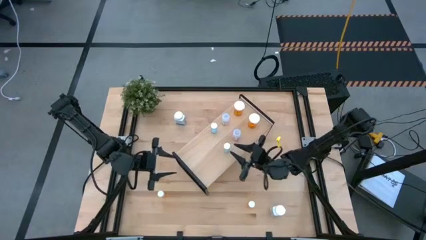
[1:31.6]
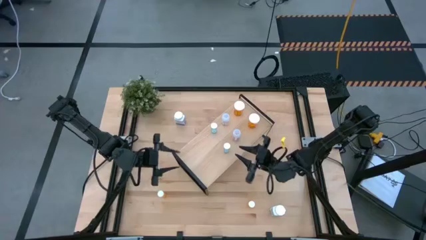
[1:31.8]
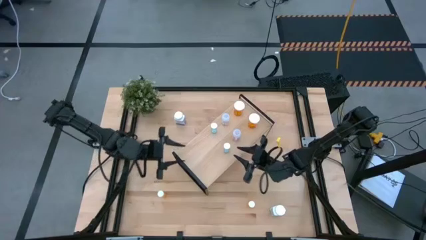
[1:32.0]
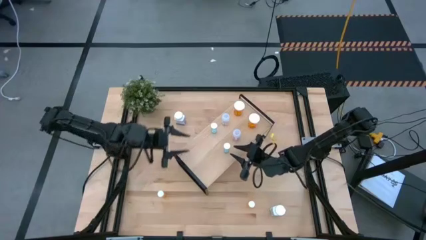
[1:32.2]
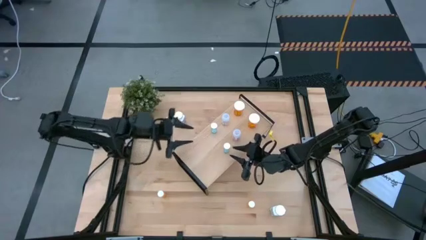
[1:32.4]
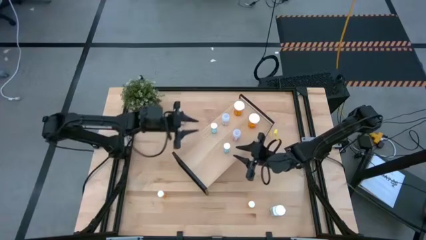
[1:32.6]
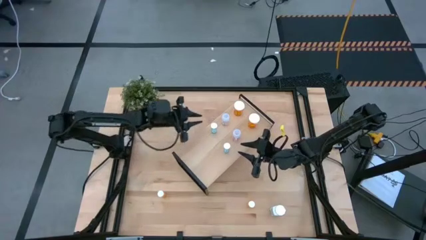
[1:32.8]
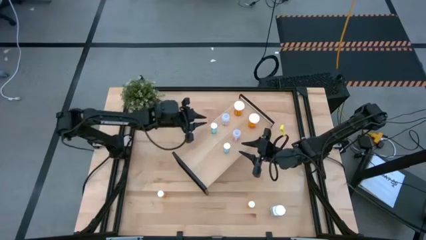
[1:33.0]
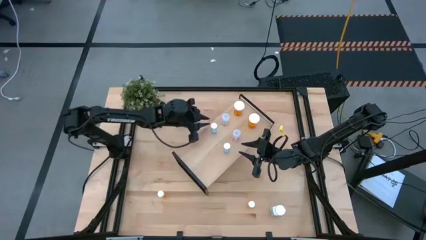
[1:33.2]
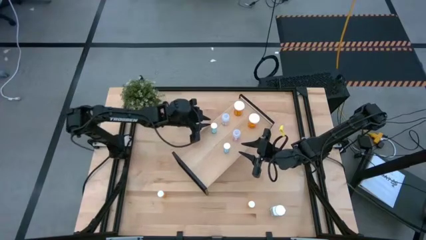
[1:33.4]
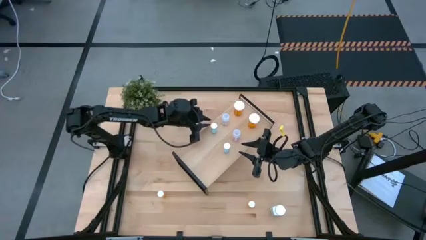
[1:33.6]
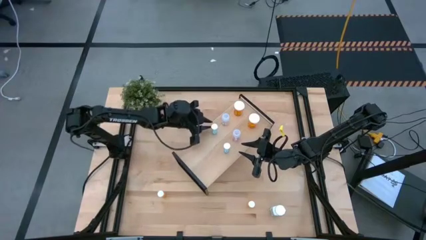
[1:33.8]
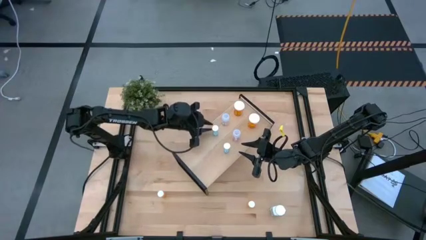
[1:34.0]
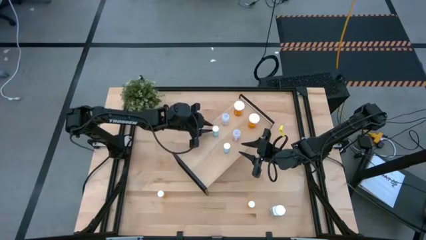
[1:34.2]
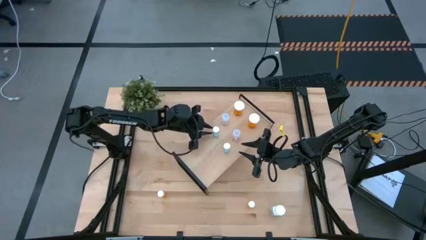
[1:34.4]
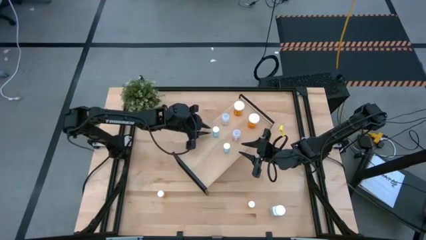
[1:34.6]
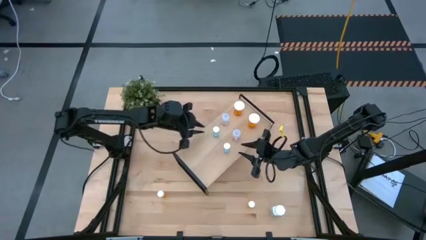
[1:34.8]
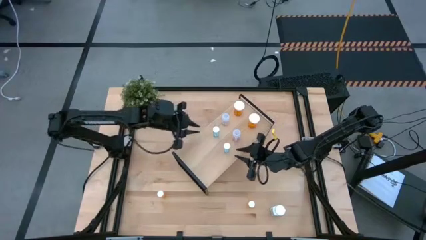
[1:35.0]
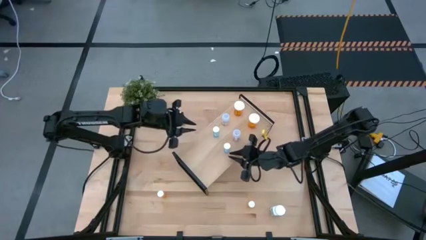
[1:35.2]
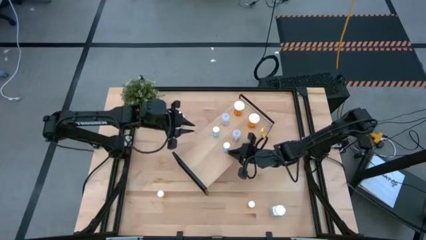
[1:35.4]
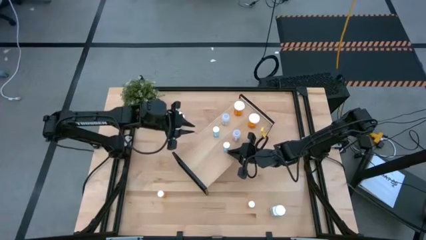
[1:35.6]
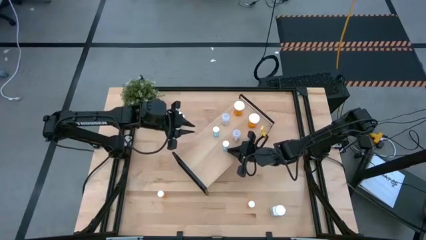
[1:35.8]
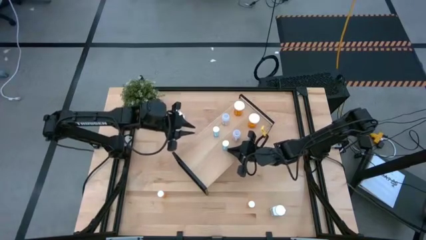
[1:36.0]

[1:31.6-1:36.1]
Task: Pick and place medicine bottles onto shelf by color
Adjust the blue pill bottles on the shelf

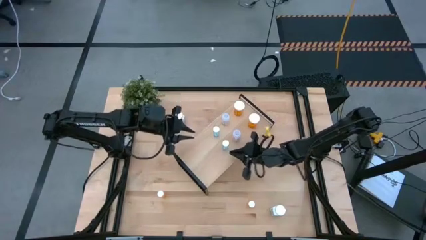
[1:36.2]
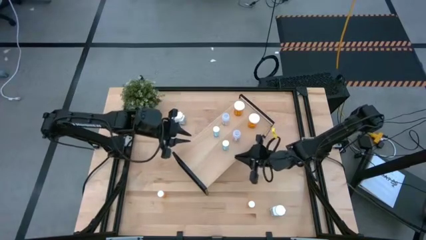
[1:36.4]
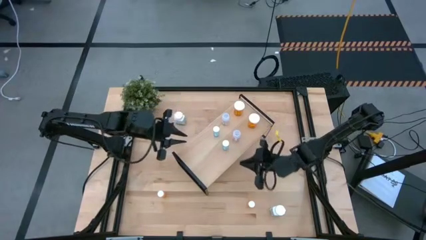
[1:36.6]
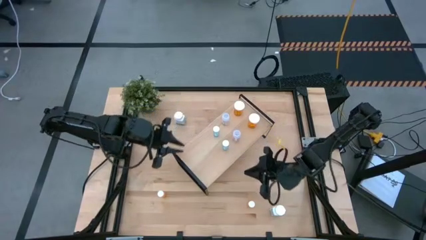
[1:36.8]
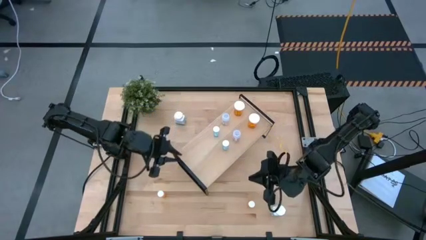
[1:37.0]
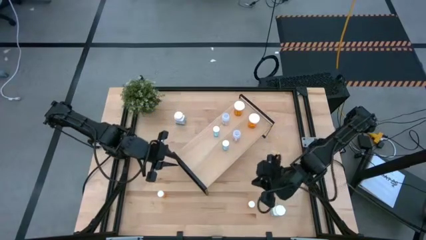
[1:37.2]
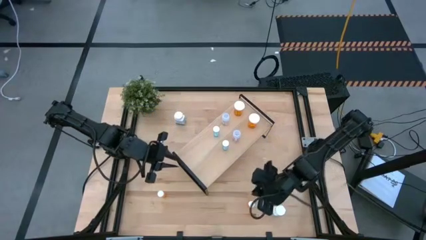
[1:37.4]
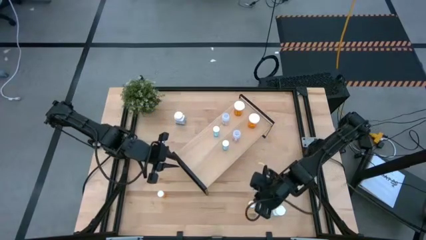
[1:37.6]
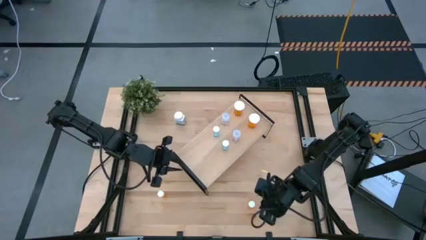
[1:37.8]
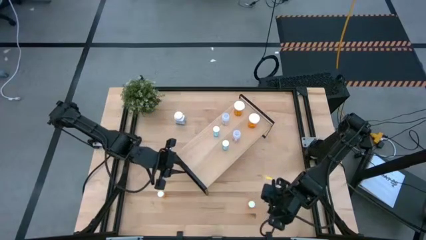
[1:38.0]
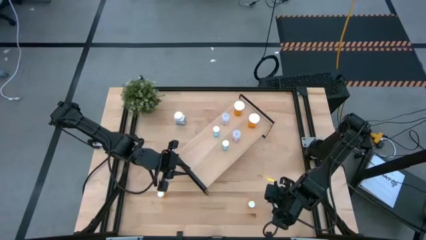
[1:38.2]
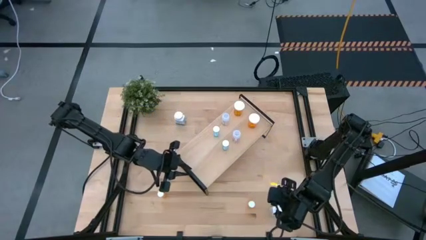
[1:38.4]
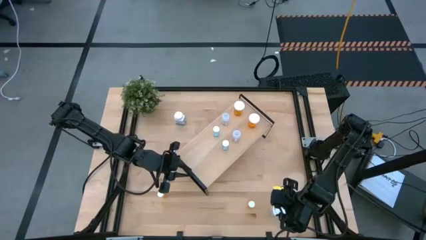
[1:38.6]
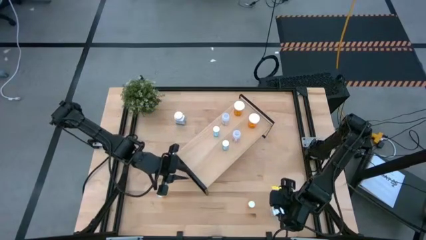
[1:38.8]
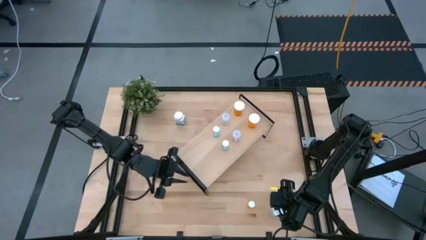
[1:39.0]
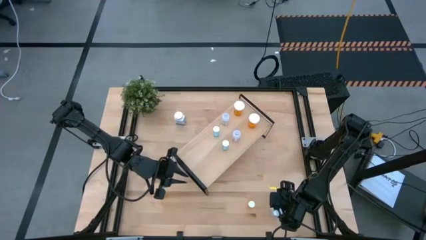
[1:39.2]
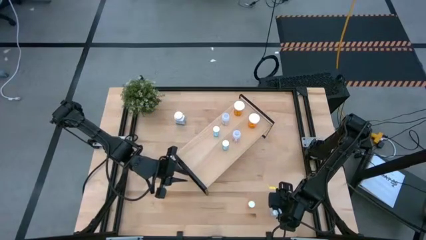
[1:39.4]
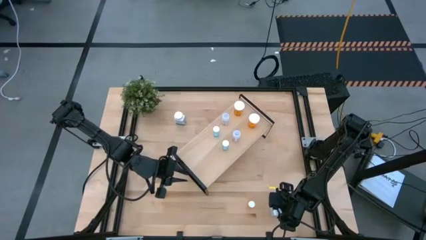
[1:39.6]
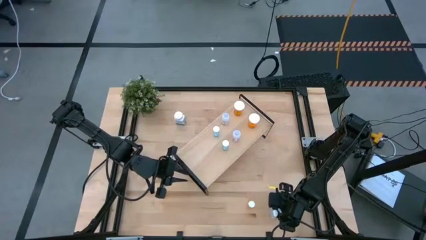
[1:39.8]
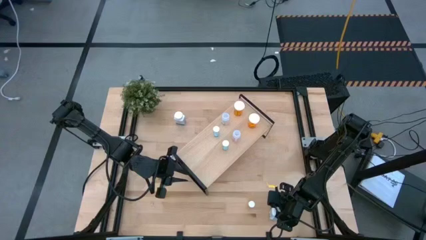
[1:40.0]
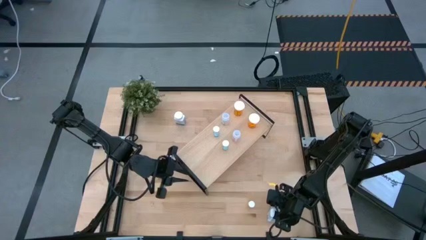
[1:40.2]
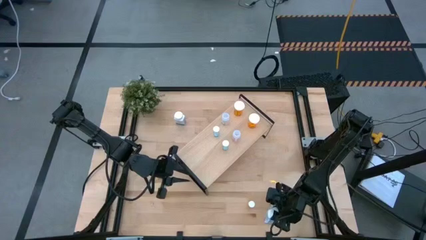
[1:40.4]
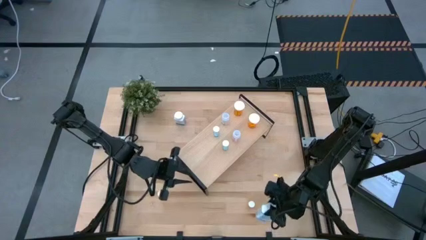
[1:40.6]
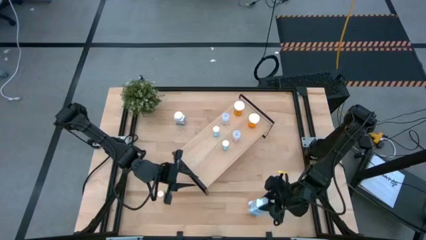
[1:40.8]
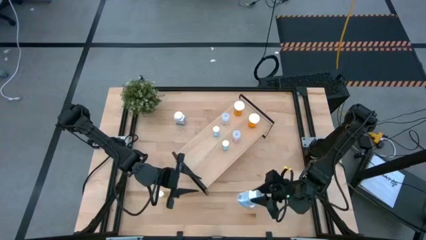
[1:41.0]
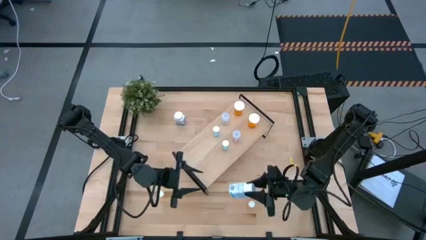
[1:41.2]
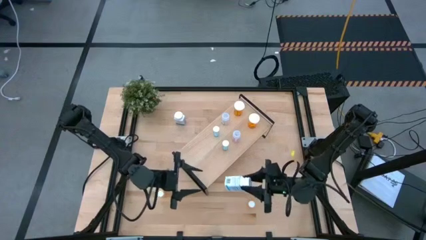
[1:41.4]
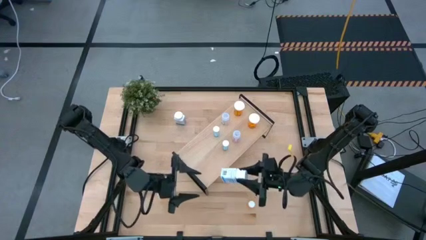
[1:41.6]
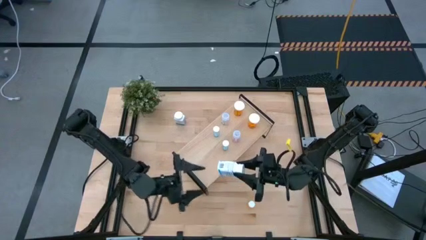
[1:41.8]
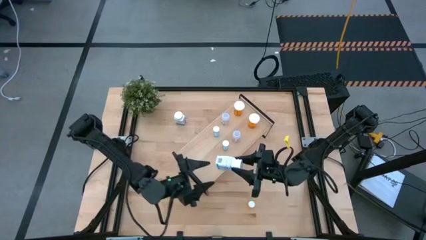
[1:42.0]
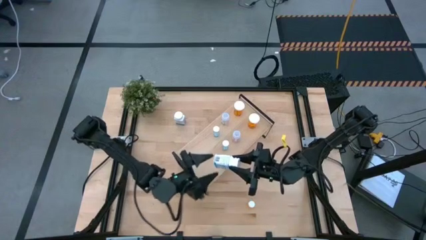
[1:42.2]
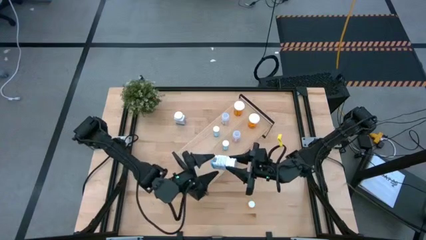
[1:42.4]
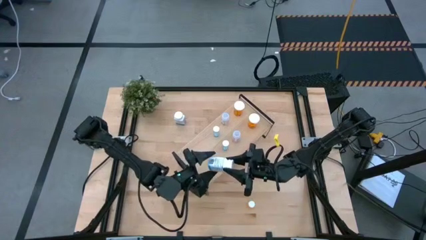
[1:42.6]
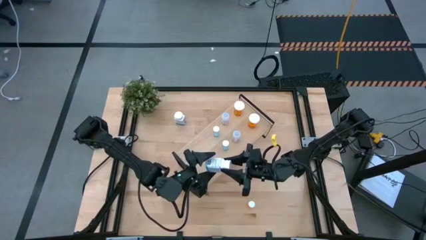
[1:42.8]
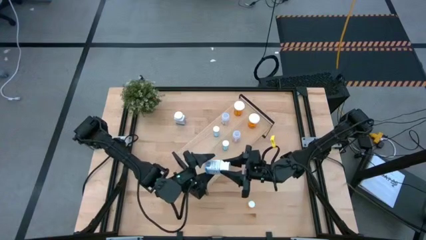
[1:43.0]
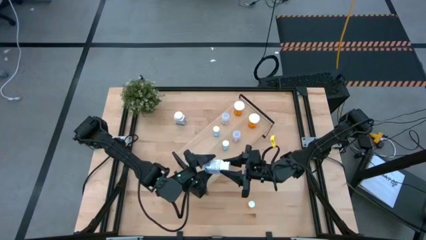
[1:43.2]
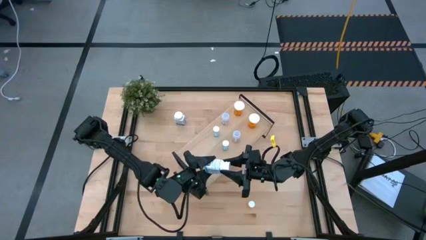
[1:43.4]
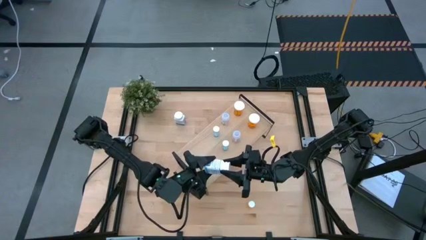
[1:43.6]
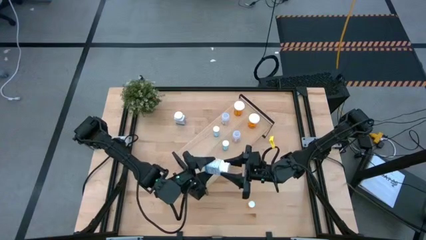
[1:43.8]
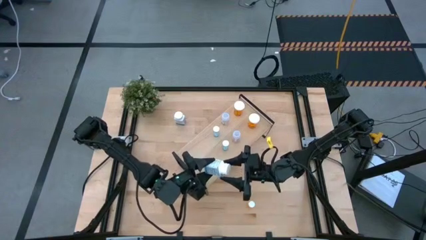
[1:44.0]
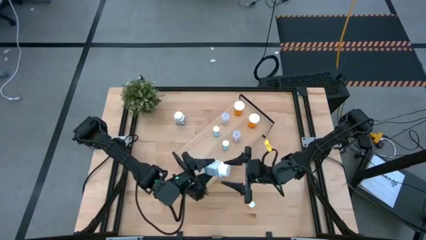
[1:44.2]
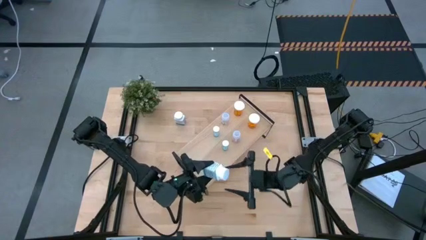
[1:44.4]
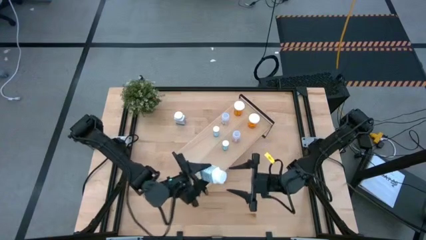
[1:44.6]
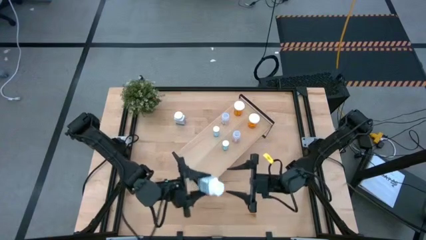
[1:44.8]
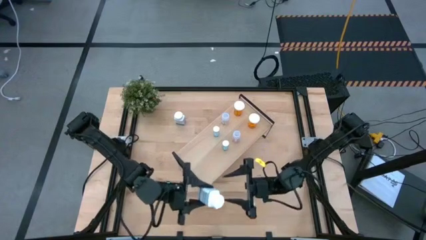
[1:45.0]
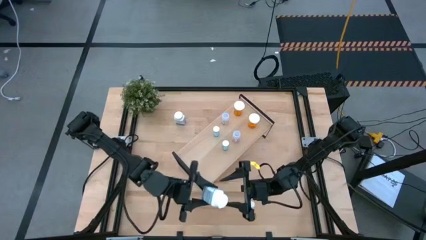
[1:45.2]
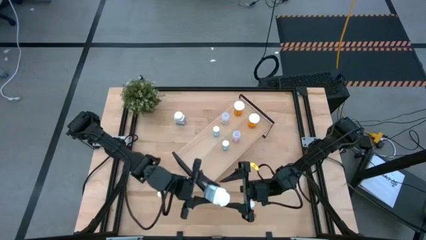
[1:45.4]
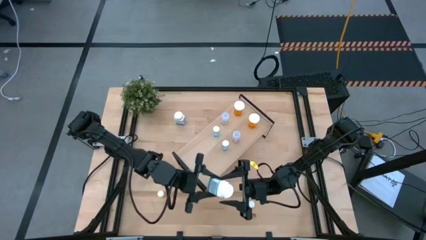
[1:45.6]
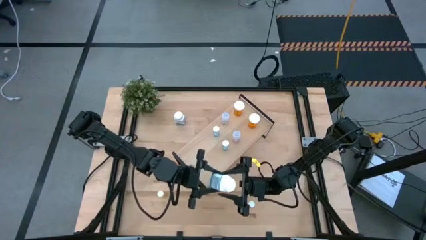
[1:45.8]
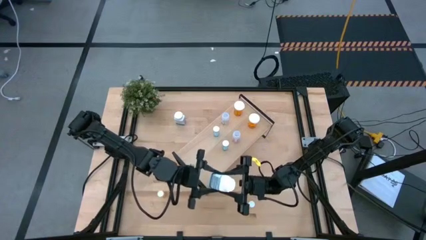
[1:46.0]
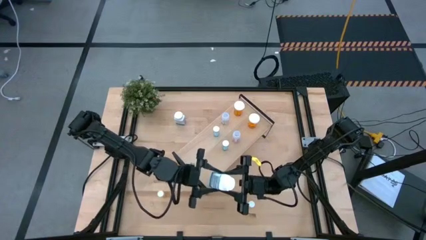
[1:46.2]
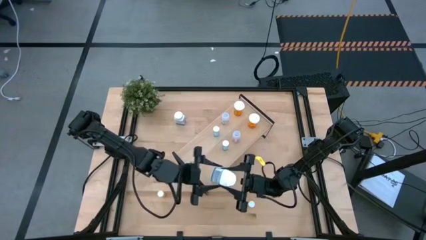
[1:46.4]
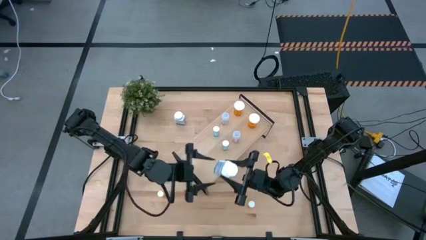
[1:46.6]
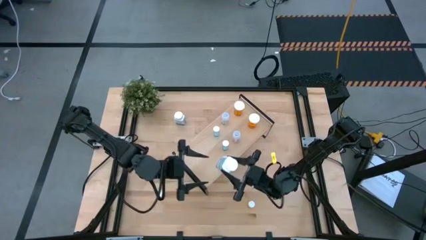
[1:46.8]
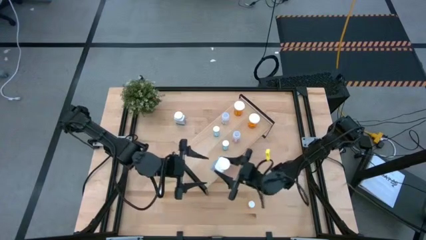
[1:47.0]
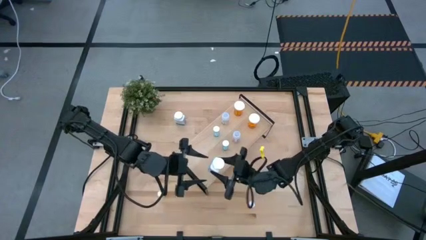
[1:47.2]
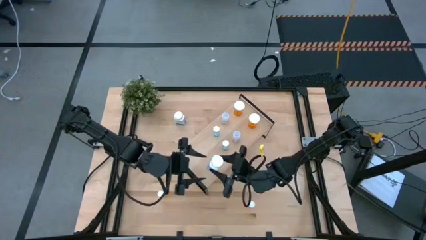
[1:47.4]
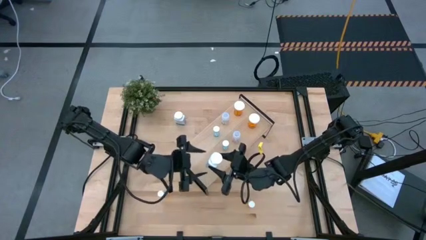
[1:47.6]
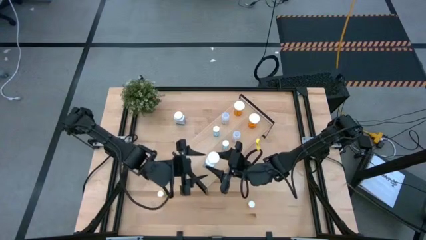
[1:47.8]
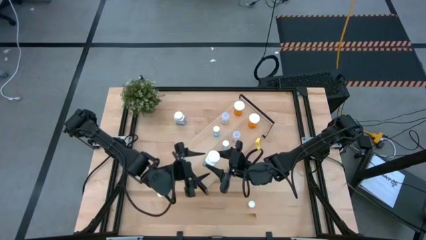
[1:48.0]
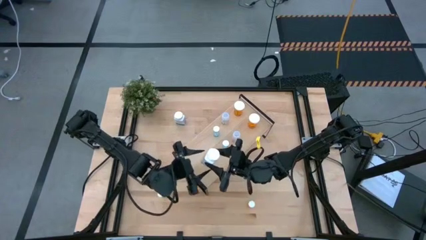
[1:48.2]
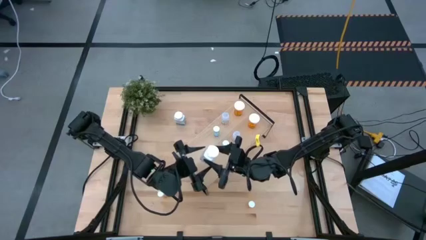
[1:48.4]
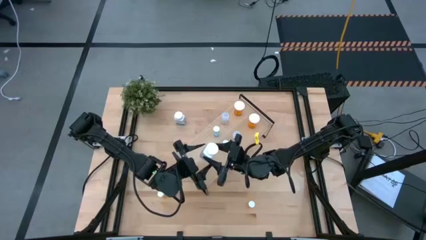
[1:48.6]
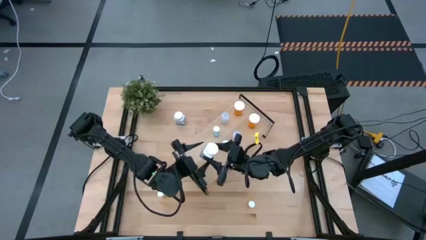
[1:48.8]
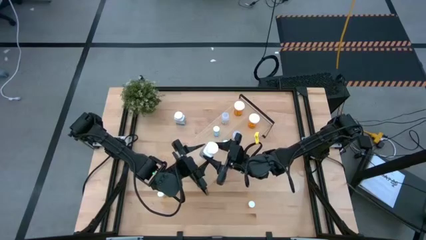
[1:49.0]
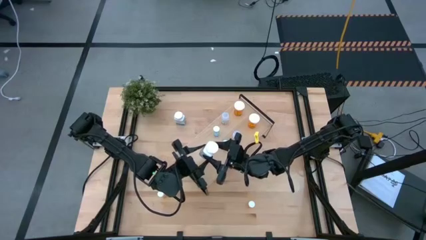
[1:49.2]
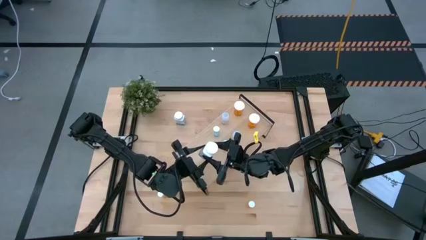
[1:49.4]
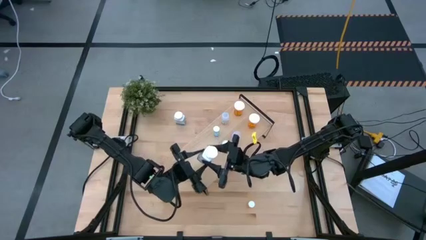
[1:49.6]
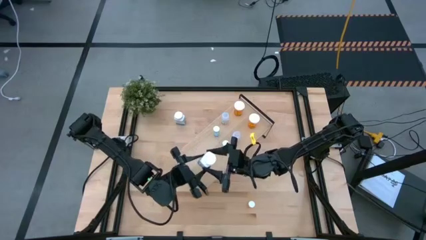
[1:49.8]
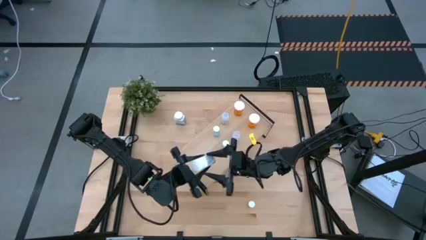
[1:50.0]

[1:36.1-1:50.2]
Put the bottom white pill bottle on the shelf
